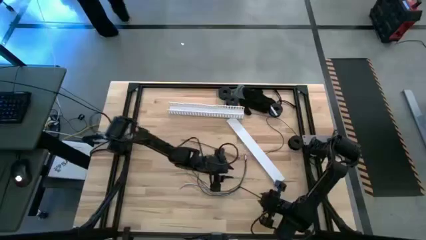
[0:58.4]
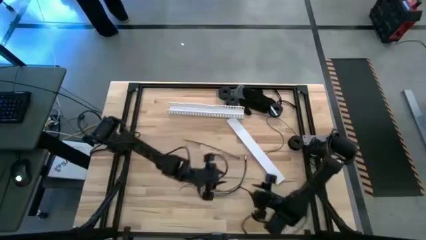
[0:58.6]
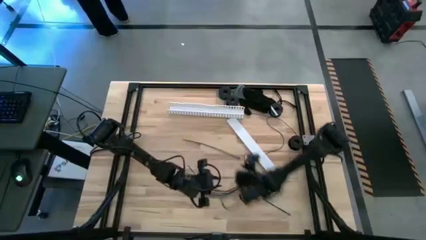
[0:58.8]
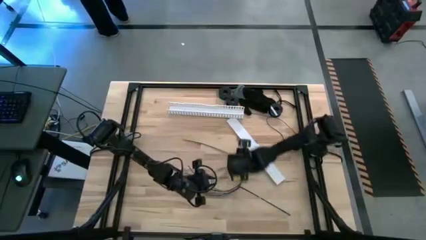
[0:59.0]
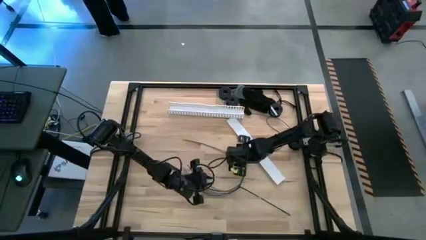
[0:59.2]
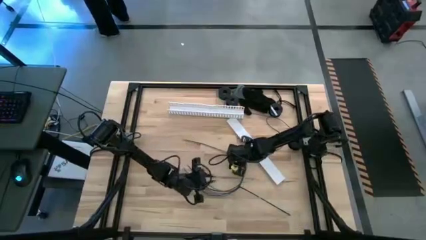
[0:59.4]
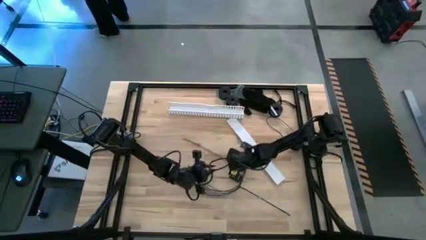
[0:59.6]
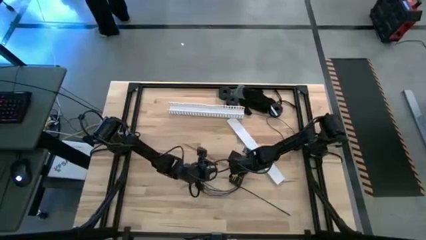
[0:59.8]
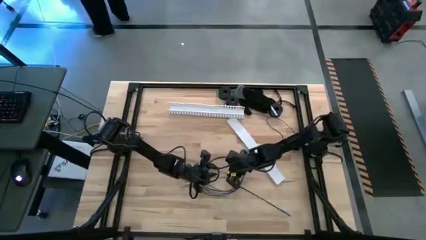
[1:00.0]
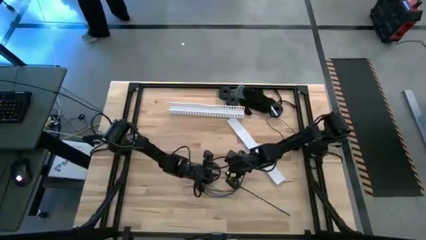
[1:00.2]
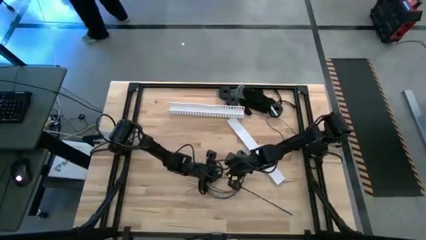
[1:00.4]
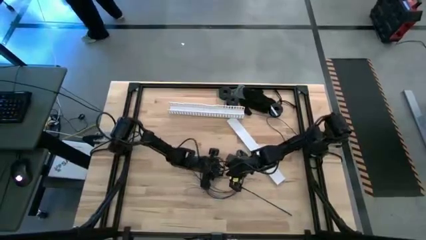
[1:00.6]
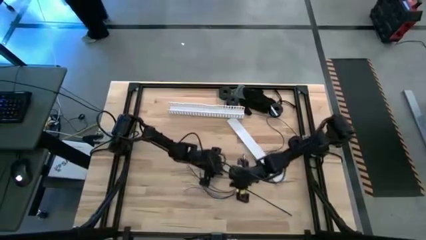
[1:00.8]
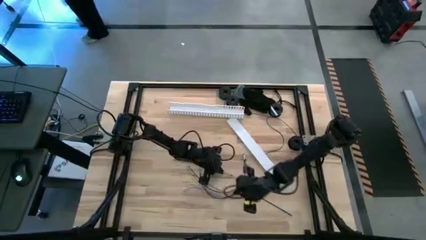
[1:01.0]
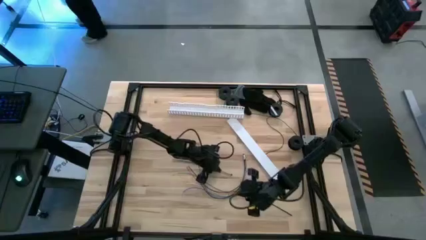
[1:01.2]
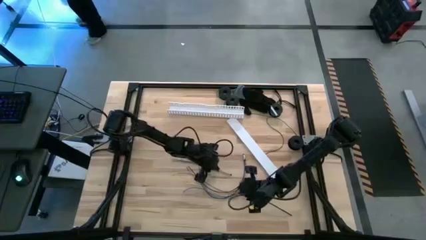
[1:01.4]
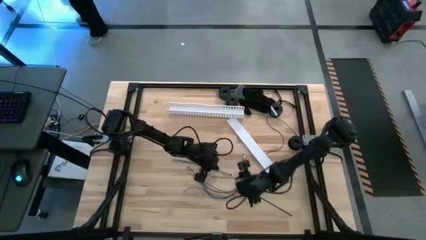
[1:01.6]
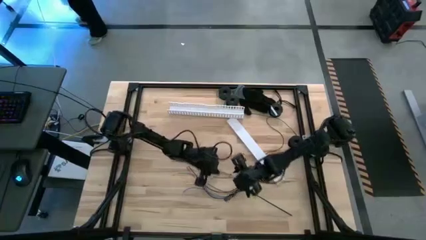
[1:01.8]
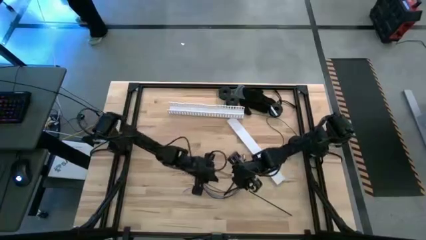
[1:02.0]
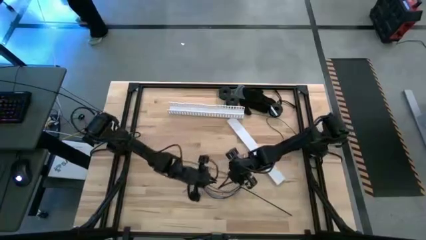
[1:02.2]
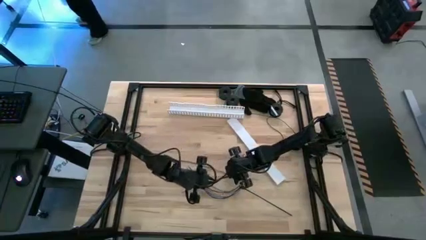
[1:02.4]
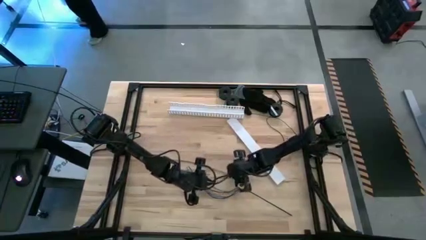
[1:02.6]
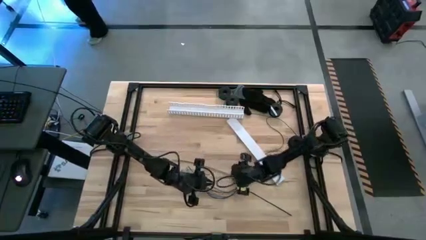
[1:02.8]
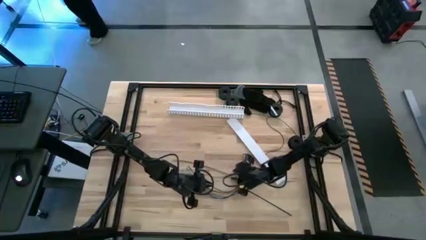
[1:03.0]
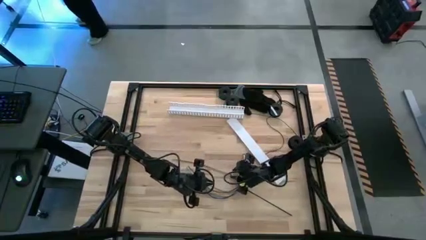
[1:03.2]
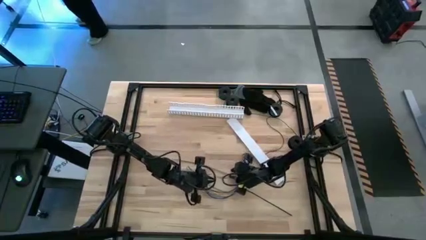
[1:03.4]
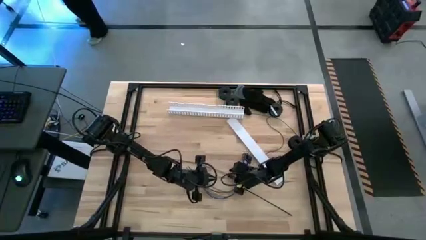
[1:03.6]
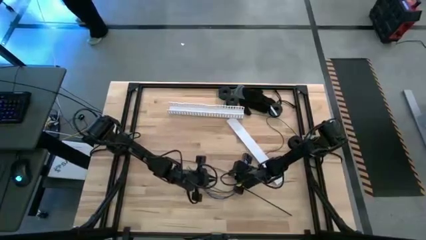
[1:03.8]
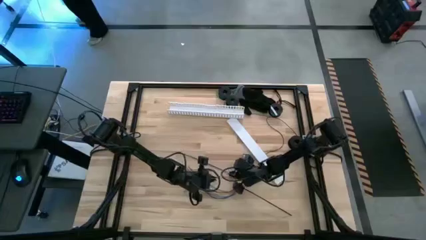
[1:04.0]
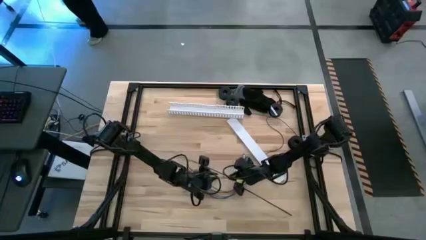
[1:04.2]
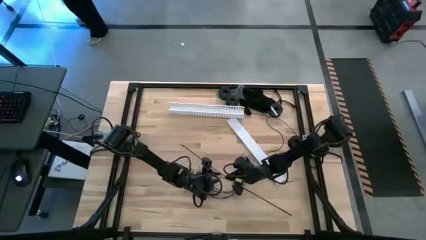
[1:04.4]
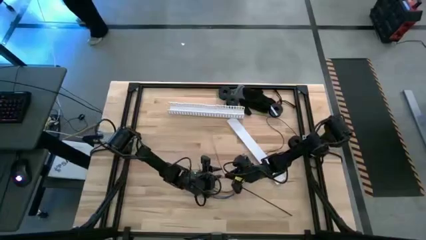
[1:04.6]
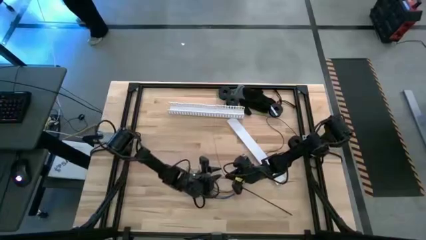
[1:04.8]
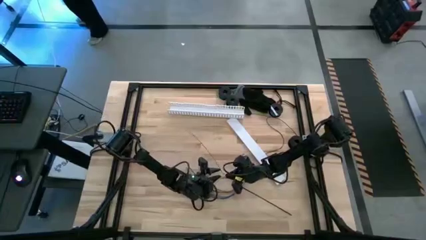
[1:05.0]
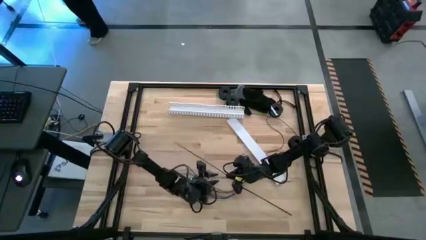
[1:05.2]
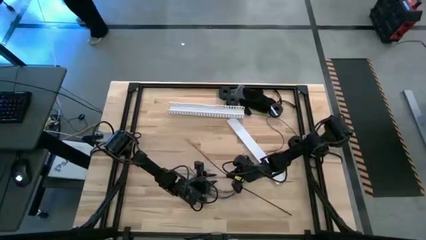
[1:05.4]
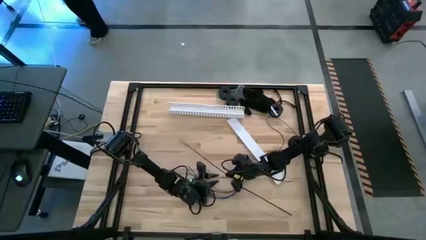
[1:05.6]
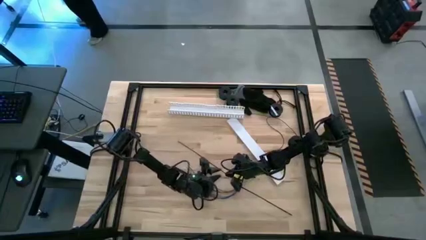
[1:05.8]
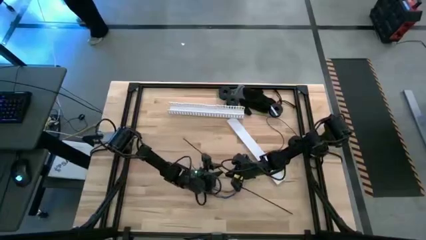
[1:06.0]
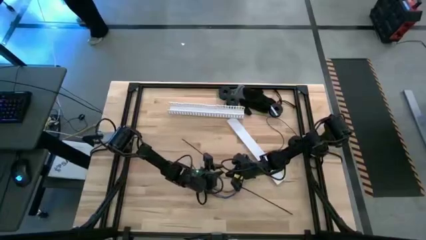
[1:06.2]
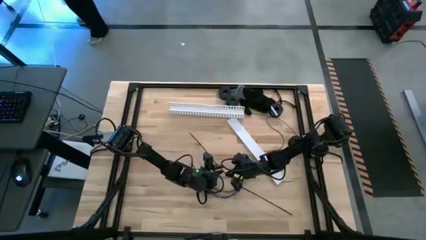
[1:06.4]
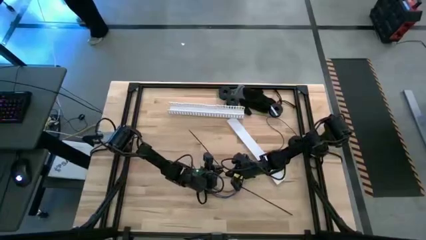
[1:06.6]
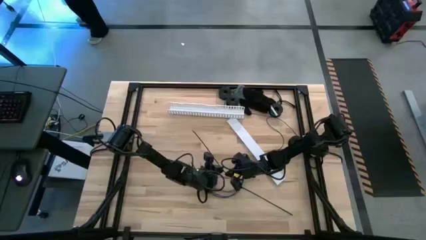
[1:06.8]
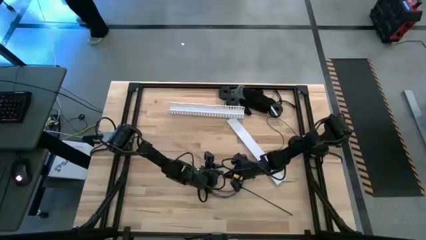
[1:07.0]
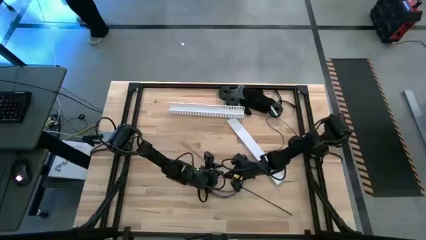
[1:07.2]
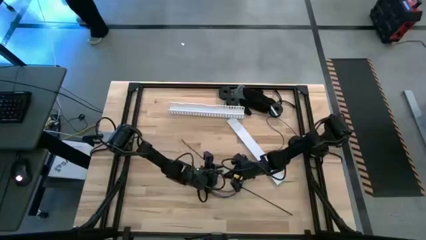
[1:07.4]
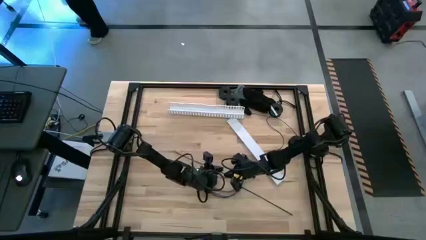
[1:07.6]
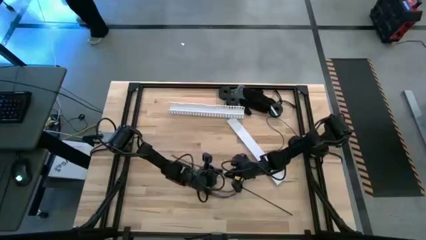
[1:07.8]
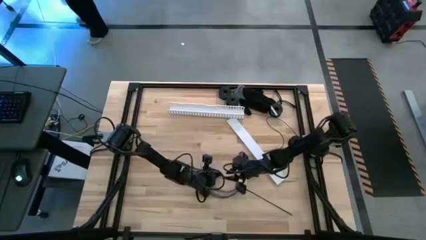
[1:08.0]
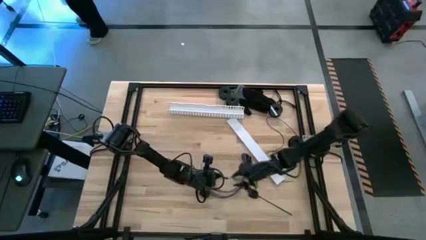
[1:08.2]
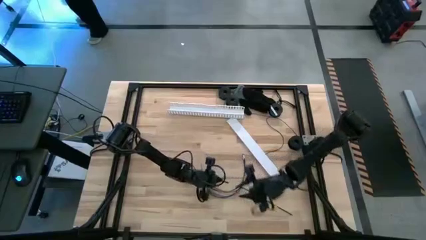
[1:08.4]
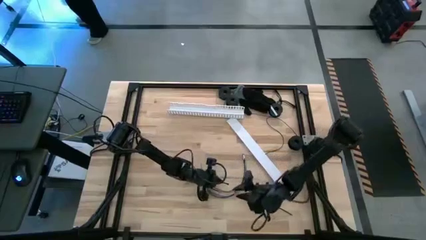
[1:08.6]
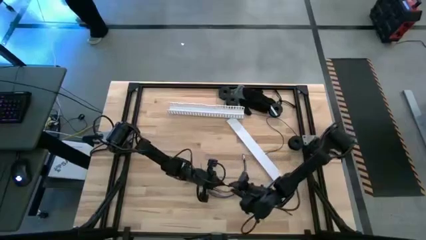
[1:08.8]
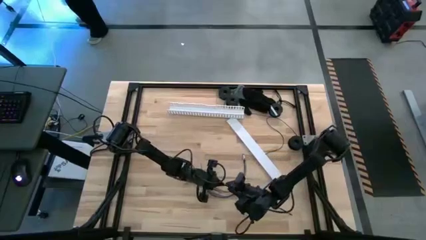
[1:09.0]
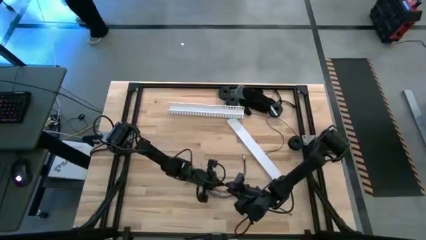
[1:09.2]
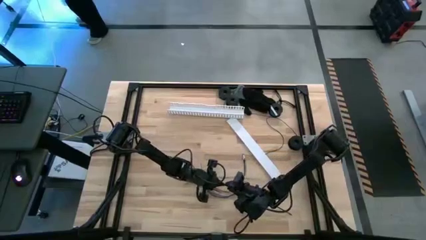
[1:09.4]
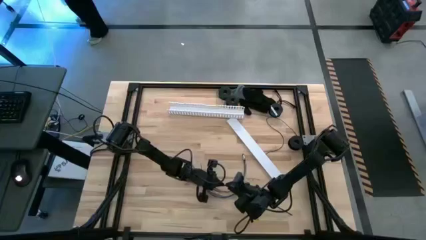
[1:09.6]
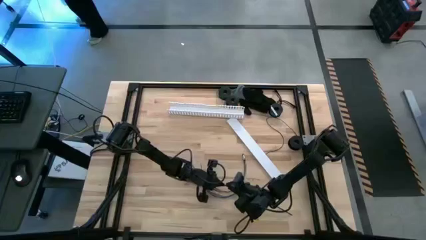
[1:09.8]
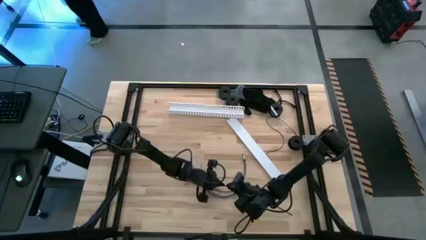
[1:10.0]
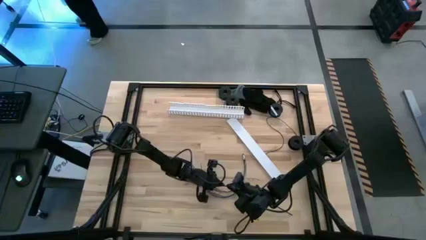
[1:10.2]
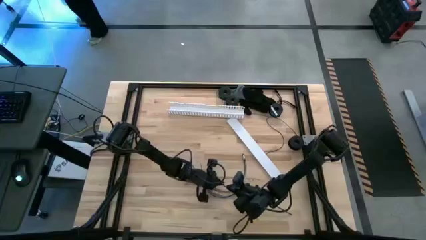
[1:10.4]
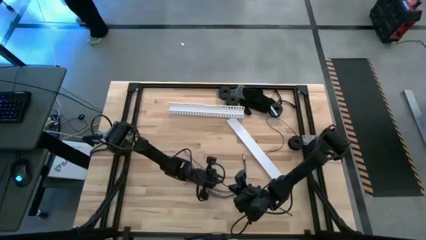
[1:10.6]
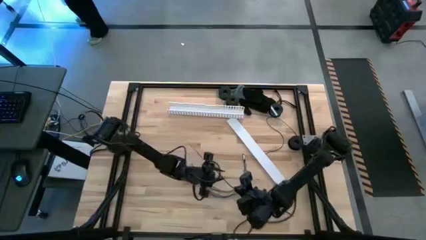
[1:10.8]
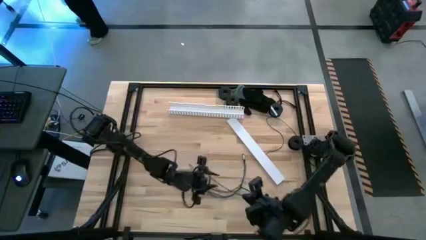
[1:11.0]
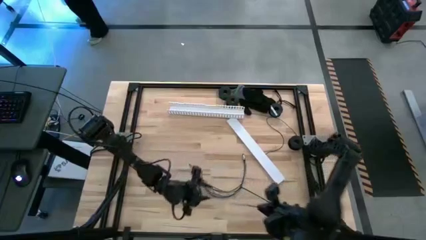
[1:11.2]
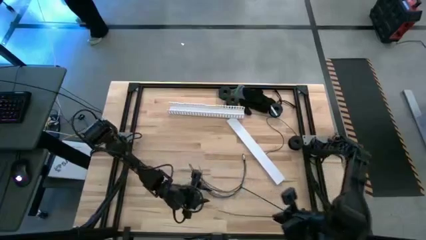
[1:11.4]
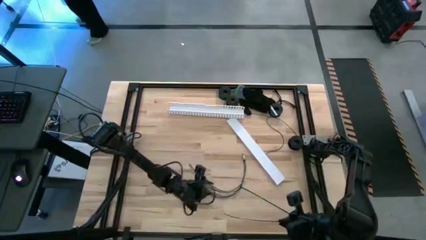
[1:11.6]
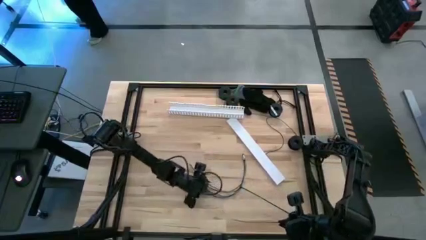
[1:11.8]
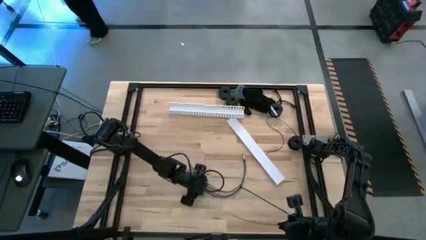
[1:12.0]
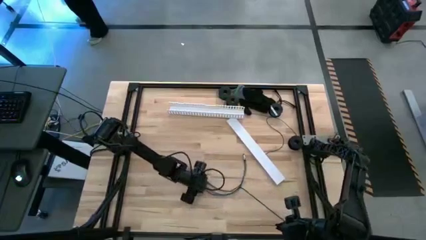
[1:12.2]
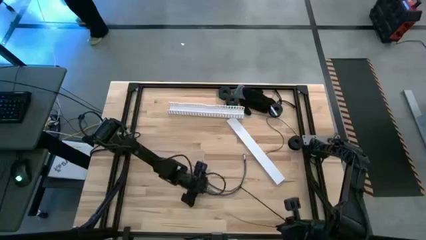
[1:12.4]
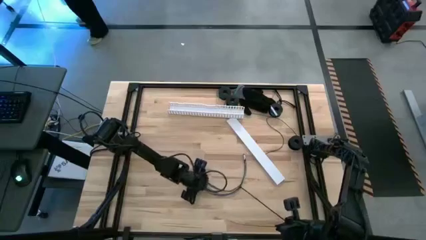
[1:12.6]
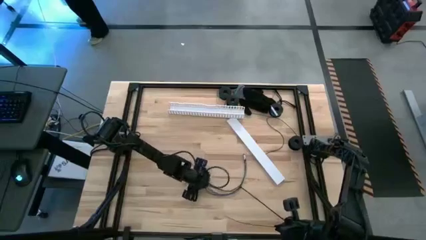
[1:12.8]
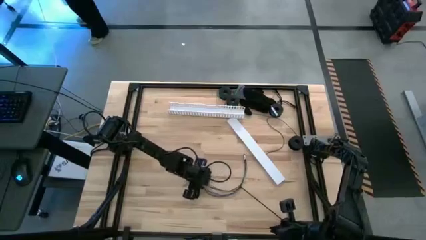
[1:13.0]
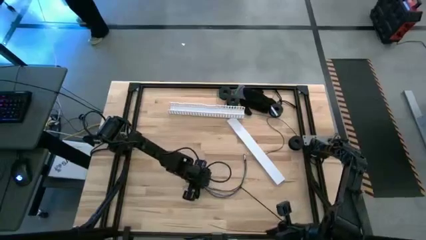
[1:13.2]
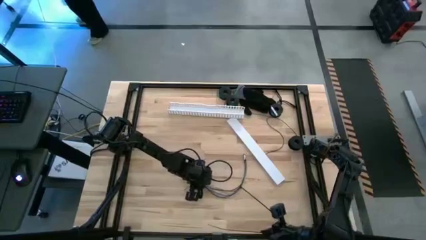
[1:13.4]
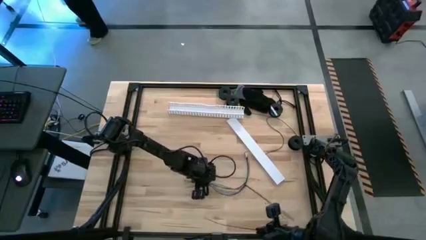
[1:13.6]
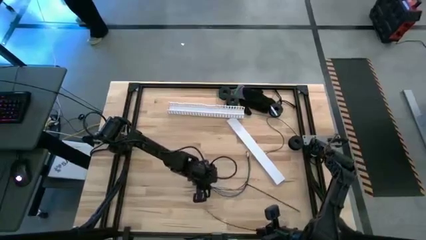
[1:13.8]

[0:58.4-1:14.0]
Task: Ziptie cables
Wrap the wire cables with the black zip tie
